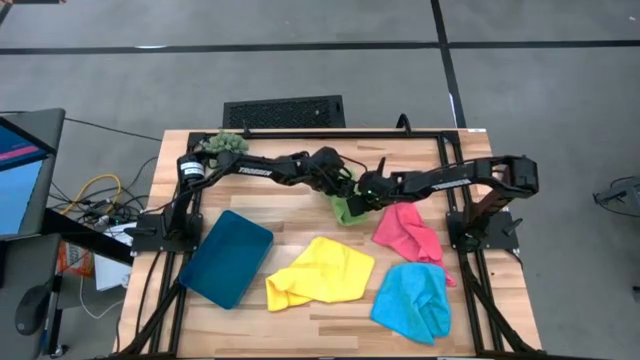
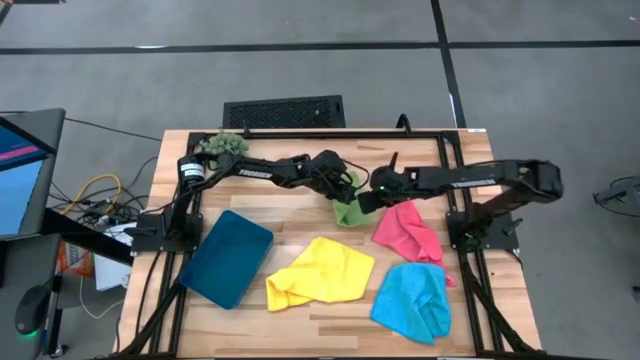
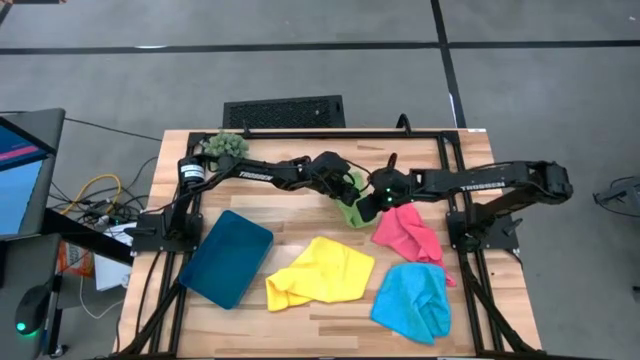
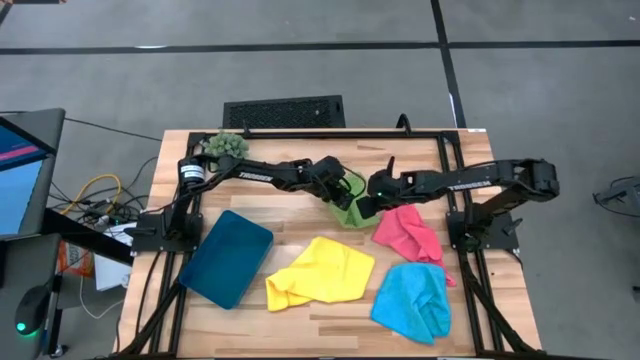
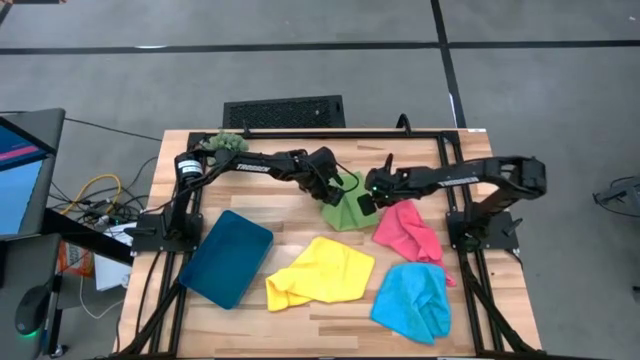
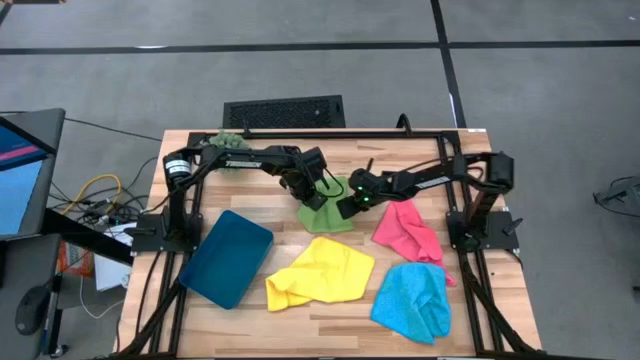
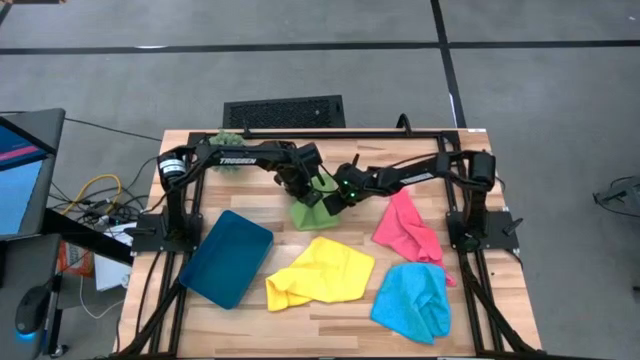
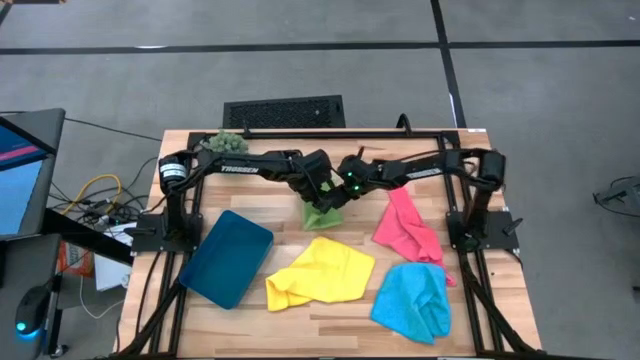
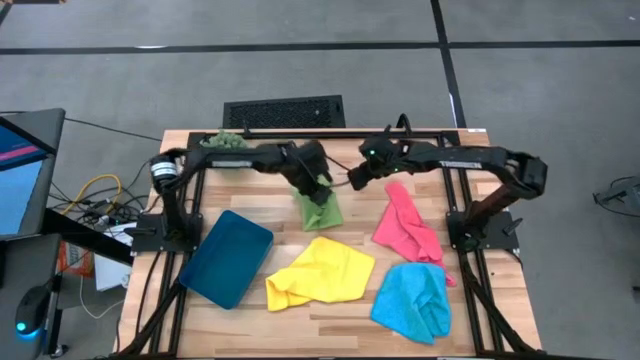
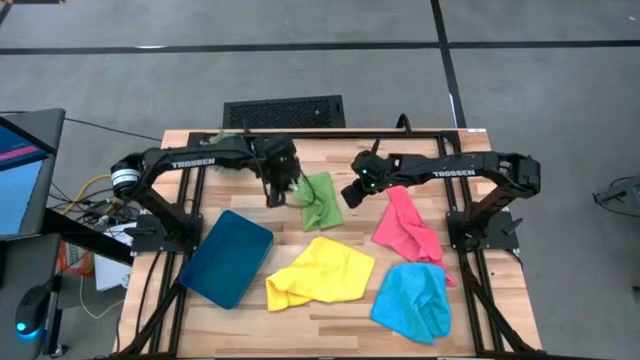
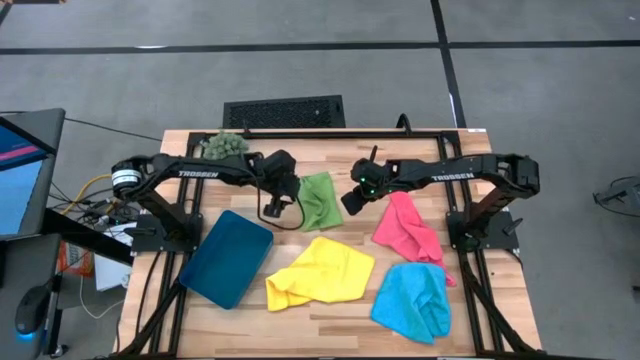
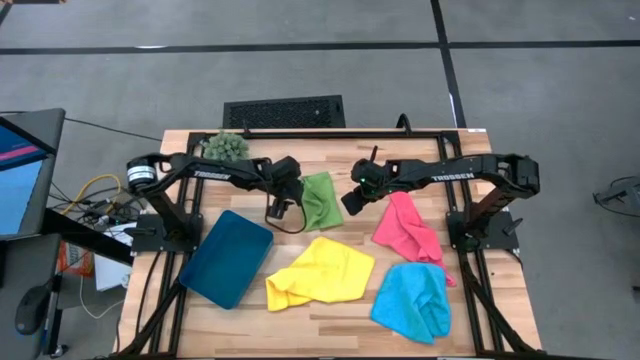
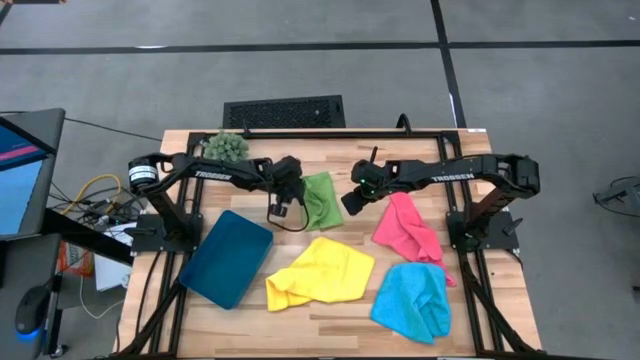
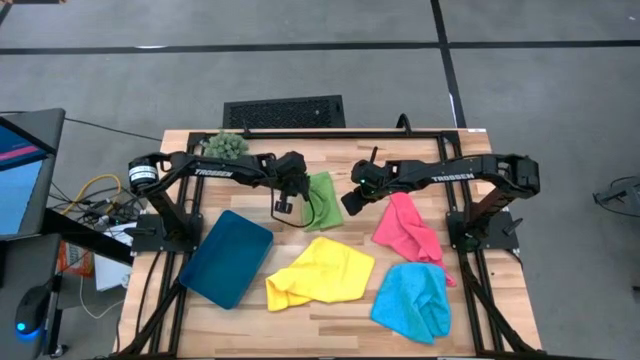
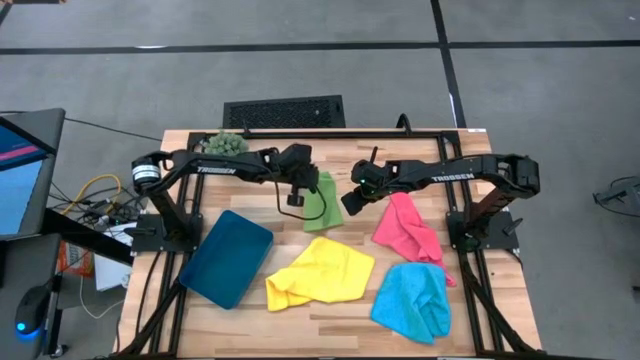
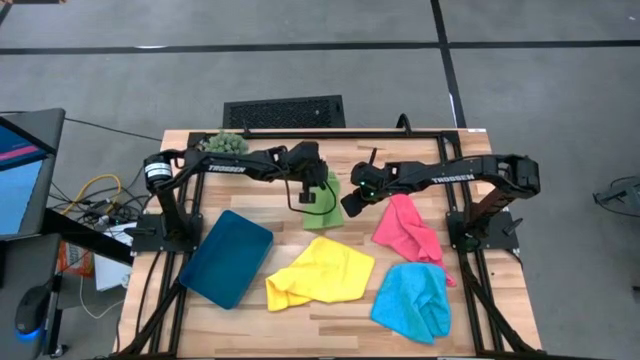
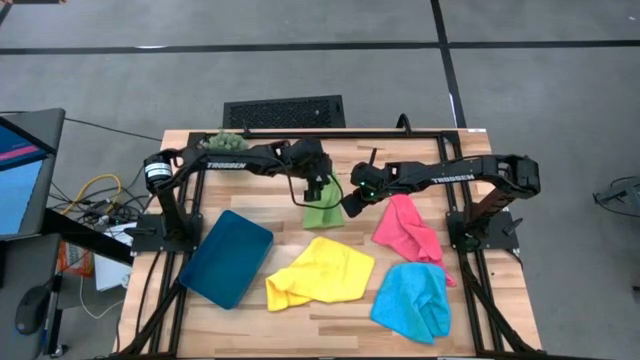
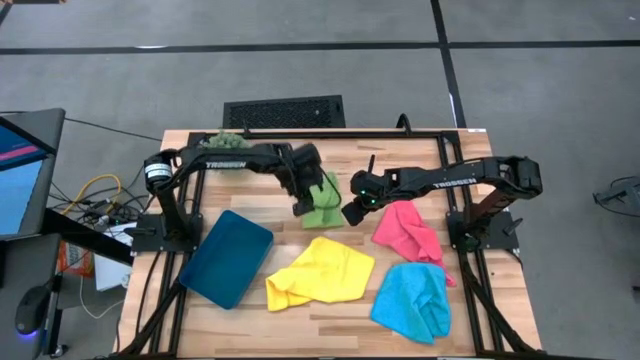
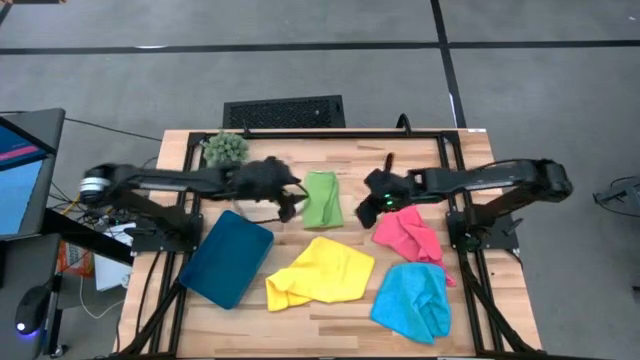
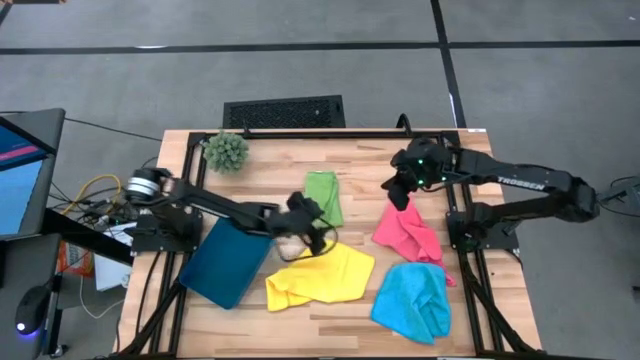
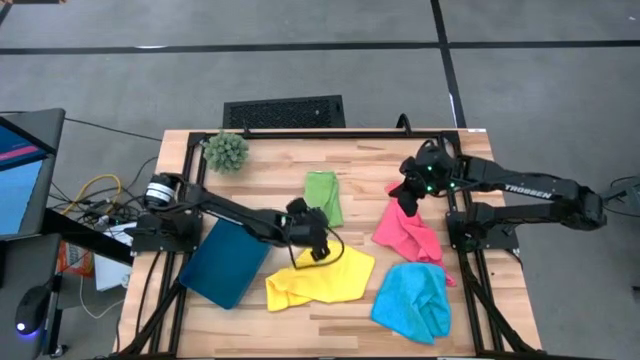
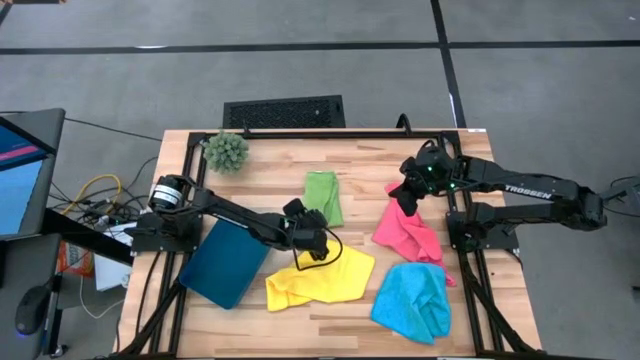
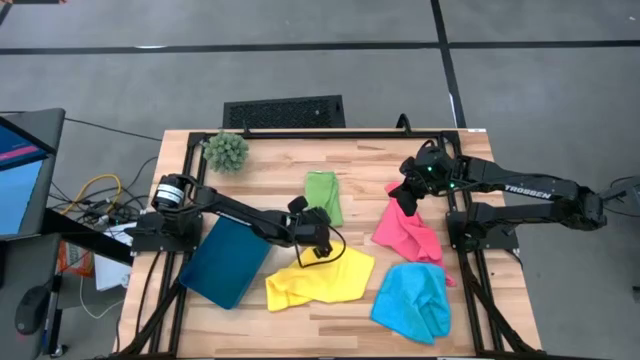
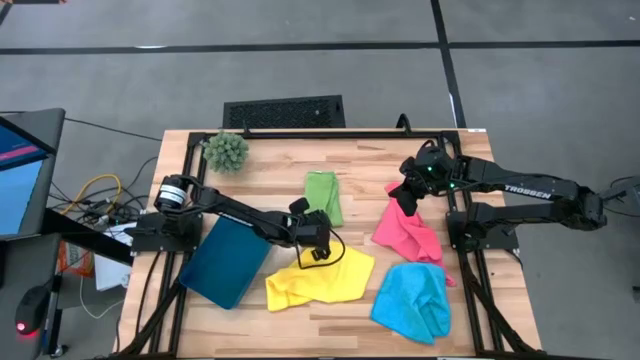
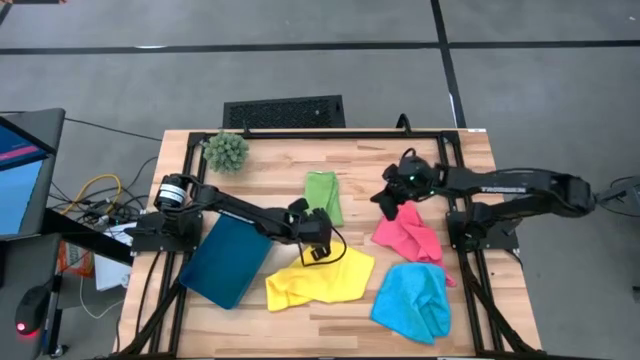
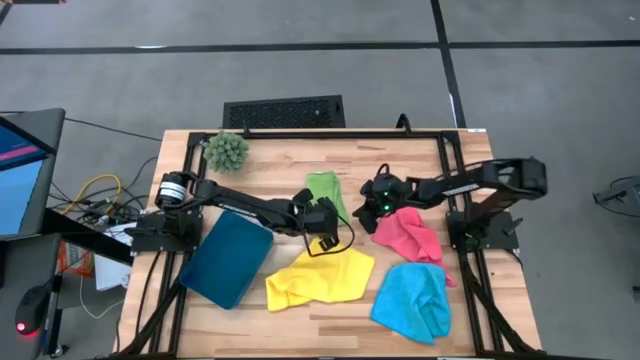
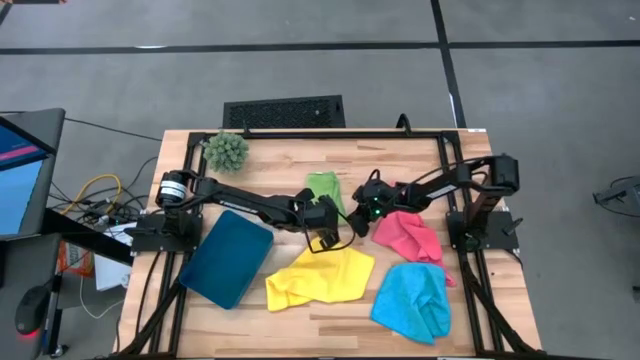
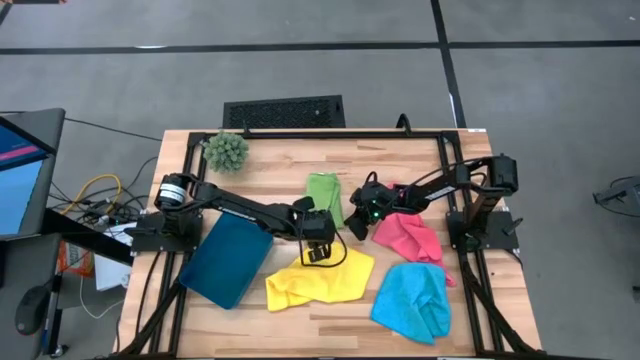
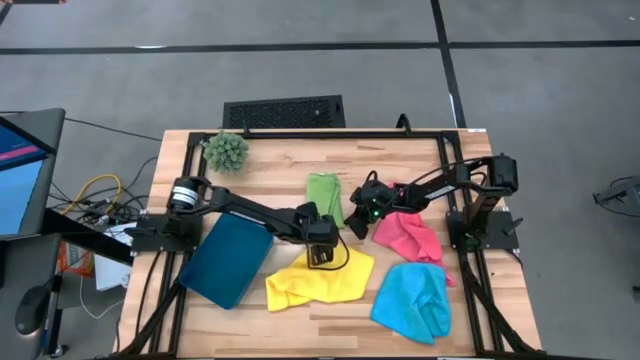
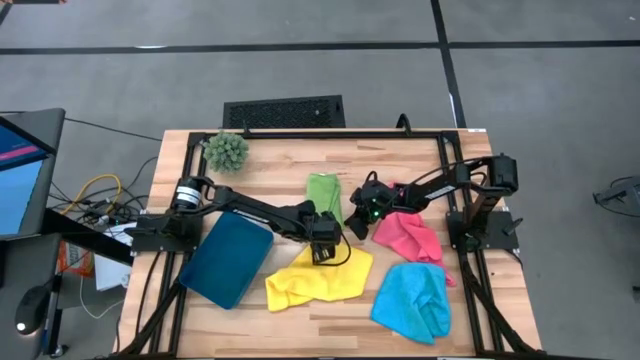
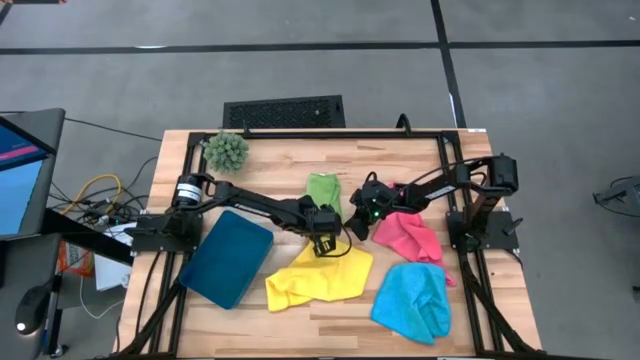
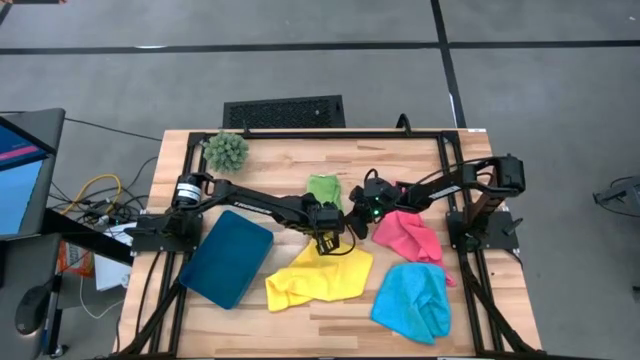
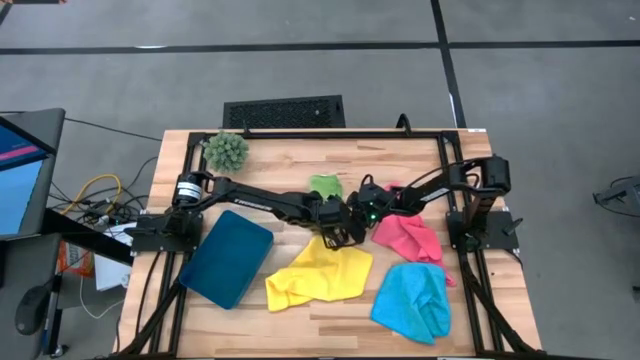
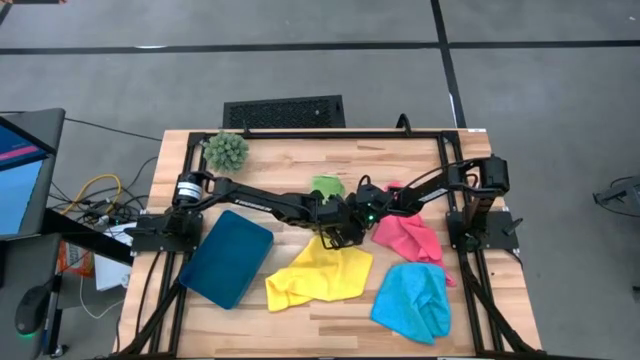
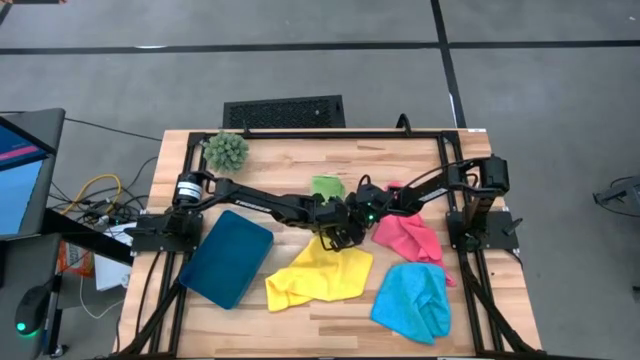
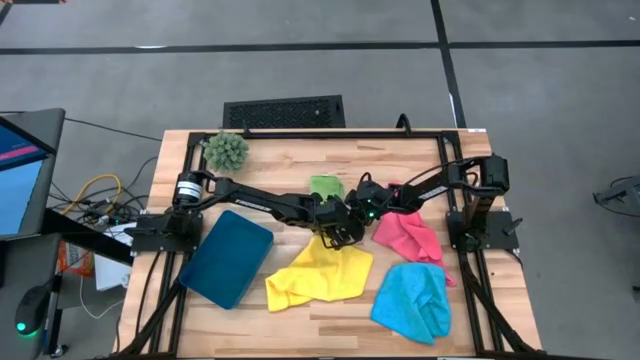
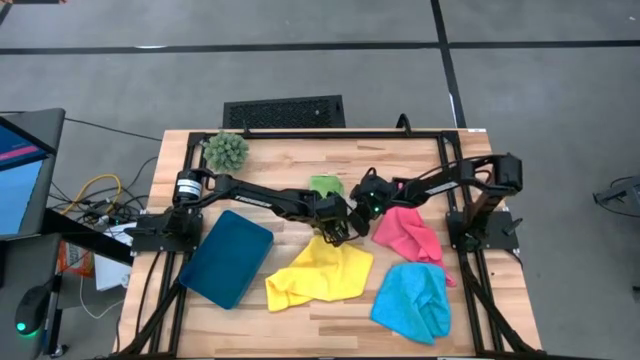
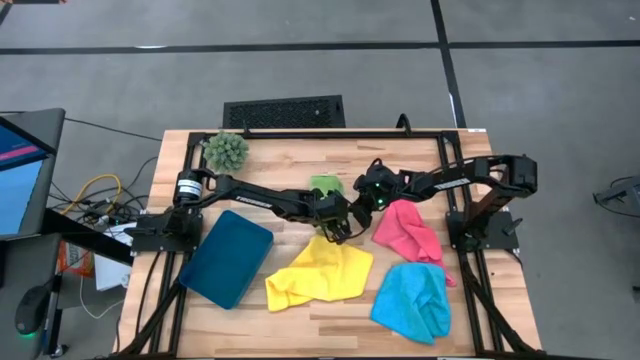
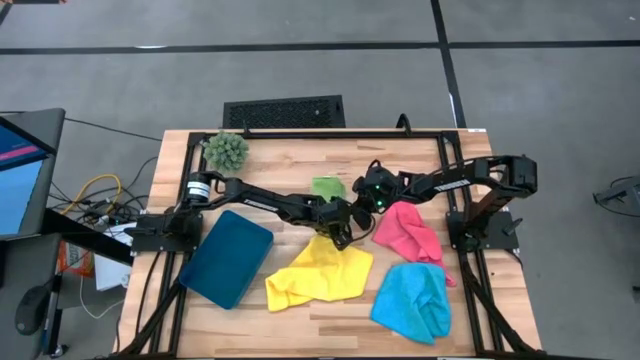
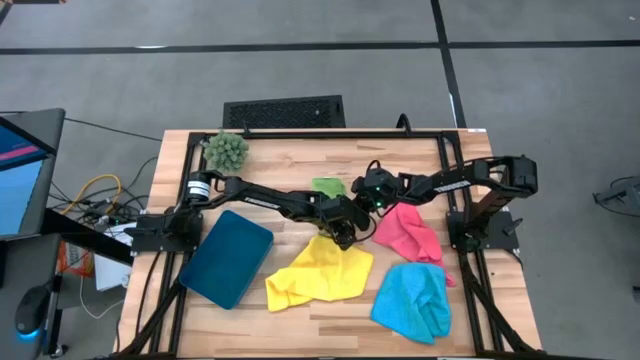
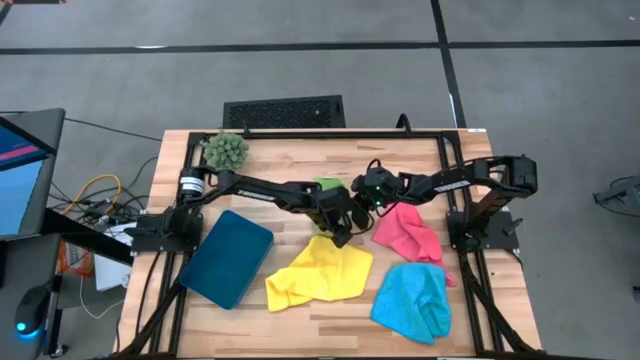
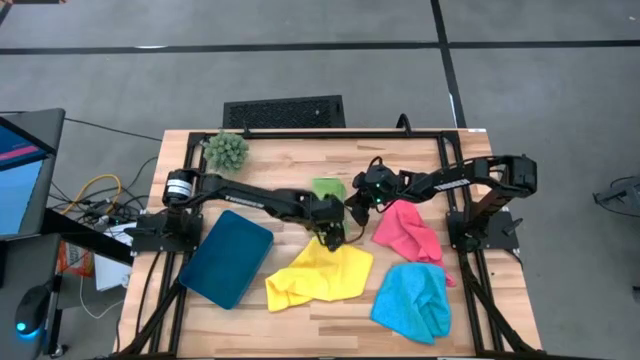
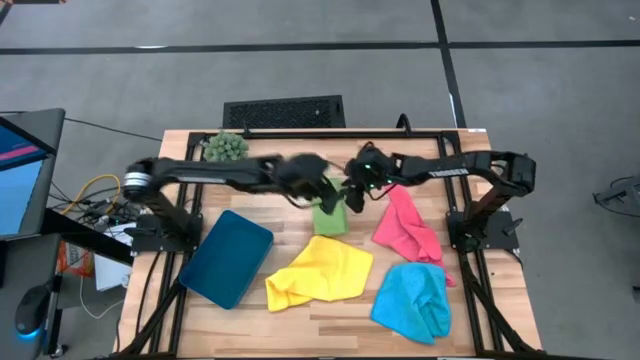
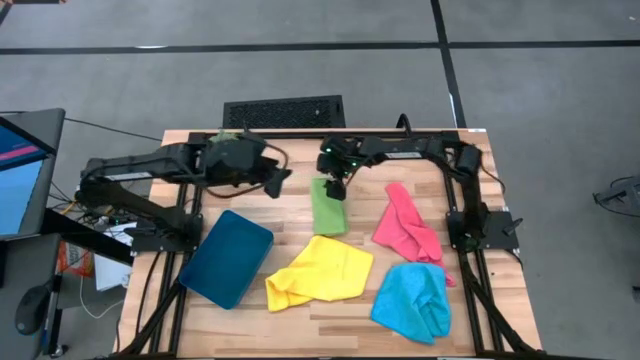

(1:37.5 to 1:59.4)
Task: Fold microfiber towels
Fold the green microfiber towel
